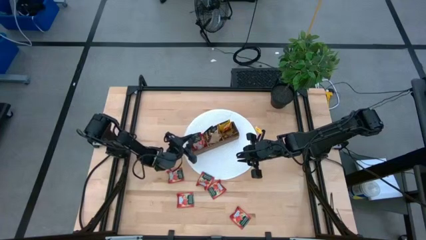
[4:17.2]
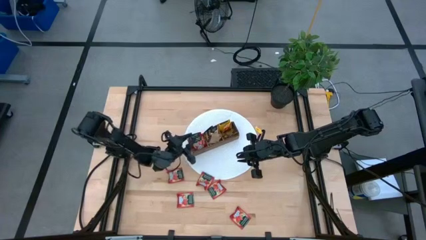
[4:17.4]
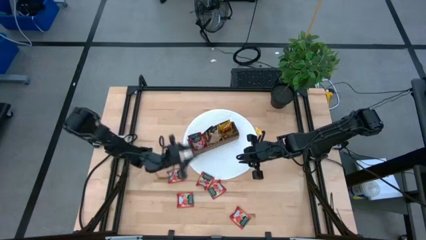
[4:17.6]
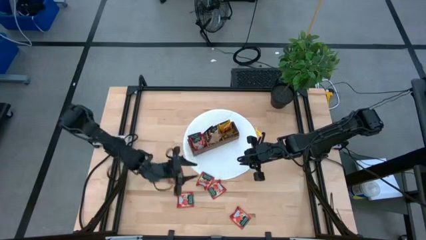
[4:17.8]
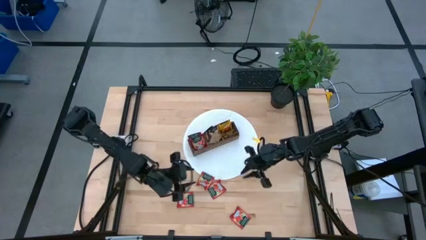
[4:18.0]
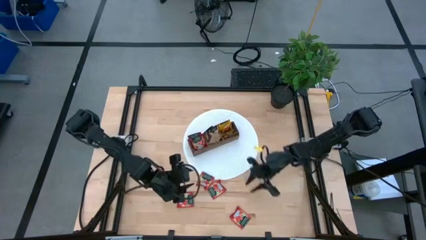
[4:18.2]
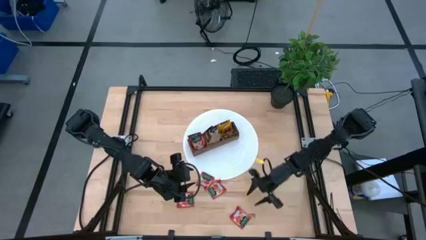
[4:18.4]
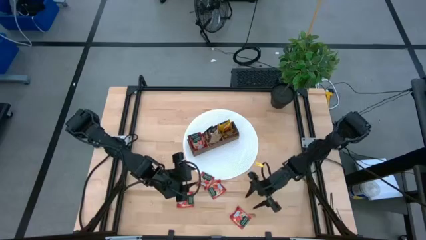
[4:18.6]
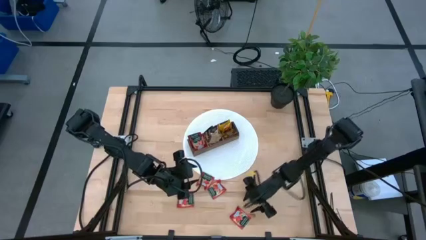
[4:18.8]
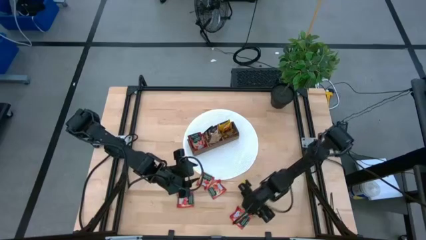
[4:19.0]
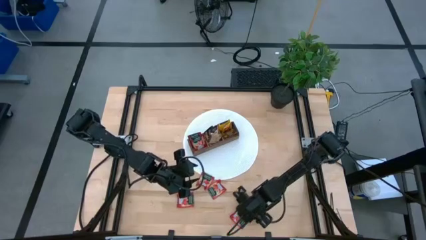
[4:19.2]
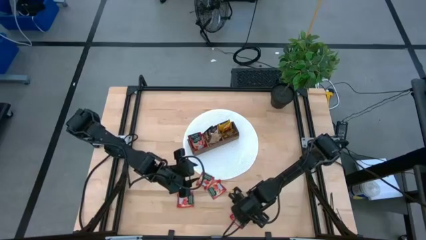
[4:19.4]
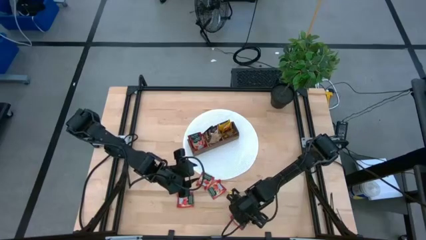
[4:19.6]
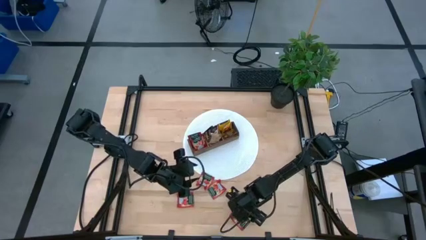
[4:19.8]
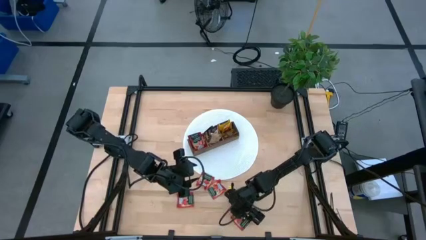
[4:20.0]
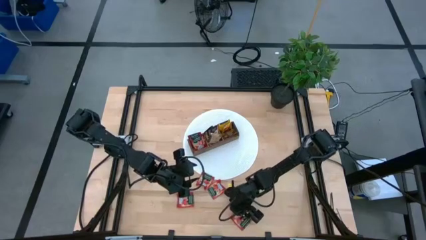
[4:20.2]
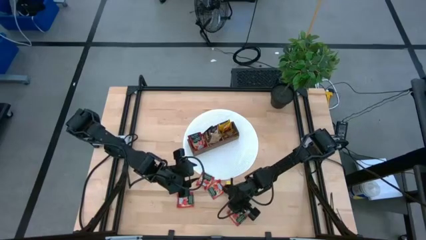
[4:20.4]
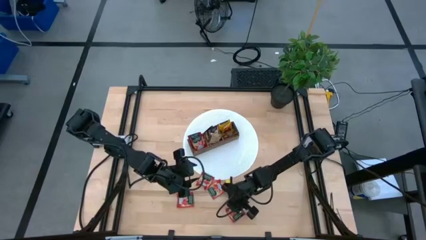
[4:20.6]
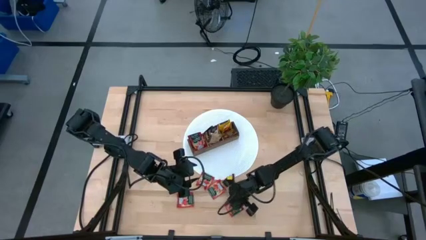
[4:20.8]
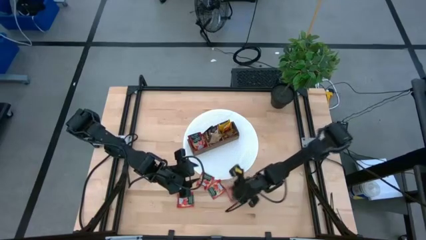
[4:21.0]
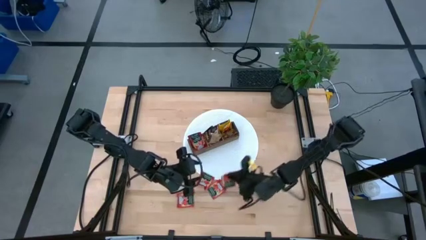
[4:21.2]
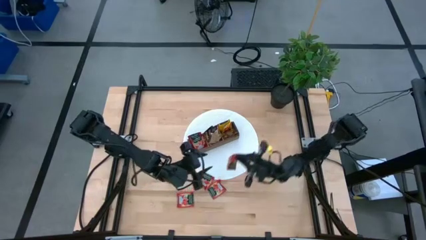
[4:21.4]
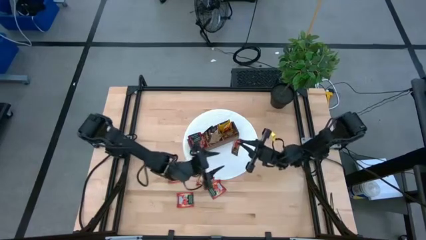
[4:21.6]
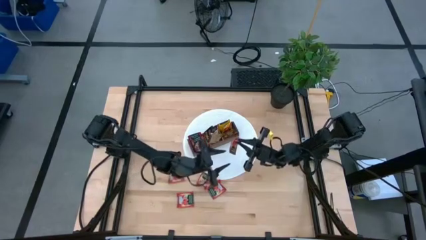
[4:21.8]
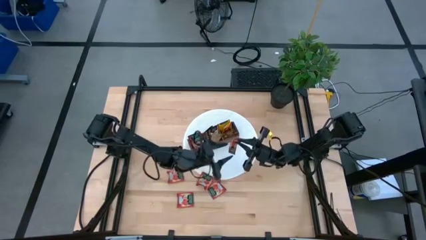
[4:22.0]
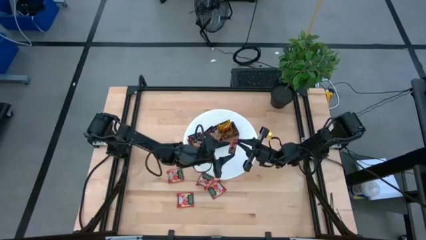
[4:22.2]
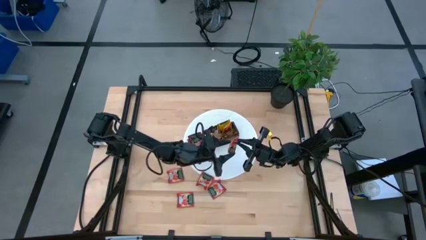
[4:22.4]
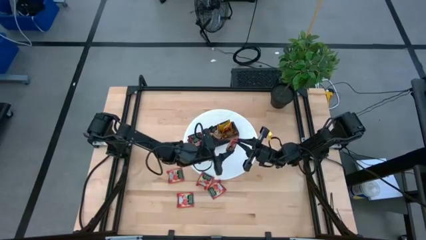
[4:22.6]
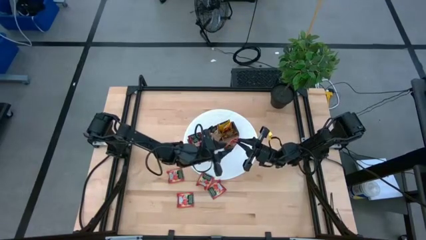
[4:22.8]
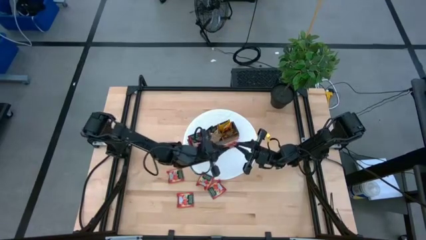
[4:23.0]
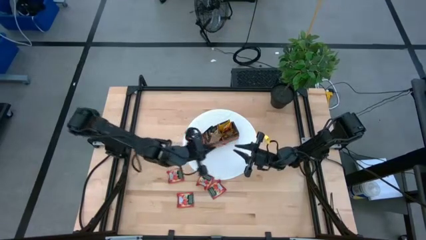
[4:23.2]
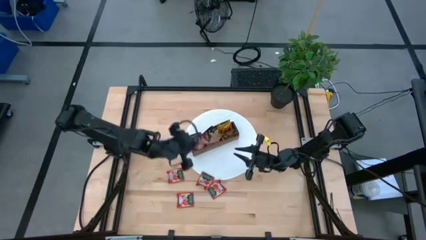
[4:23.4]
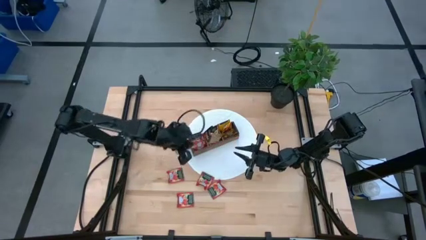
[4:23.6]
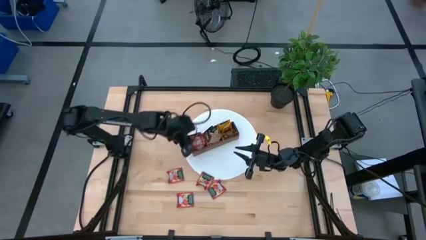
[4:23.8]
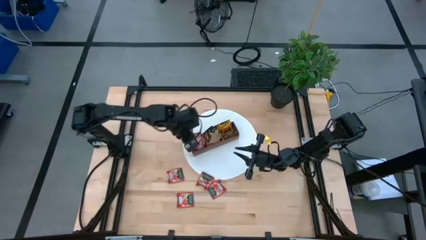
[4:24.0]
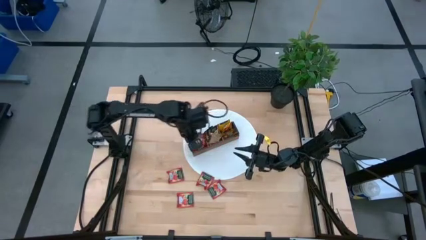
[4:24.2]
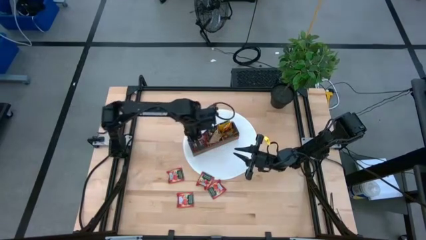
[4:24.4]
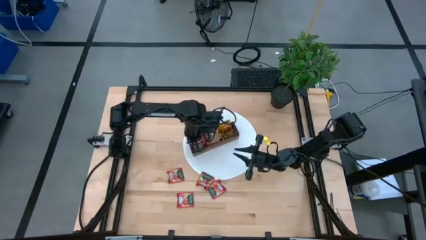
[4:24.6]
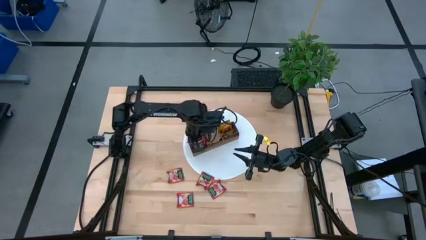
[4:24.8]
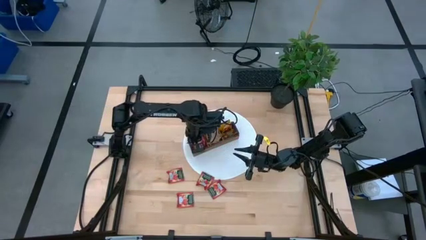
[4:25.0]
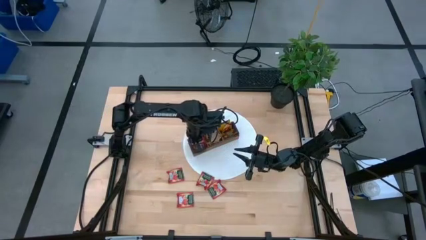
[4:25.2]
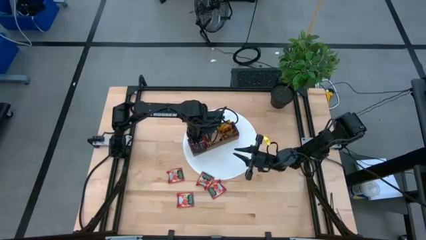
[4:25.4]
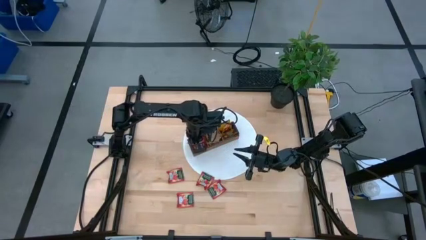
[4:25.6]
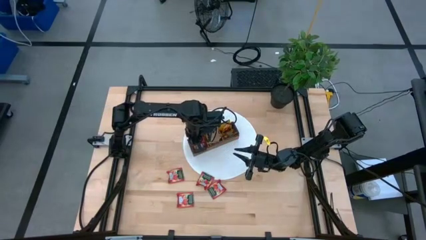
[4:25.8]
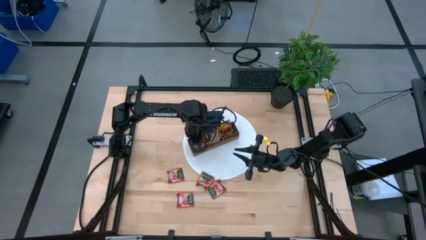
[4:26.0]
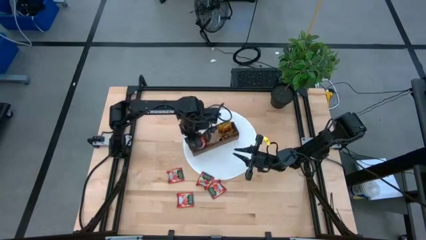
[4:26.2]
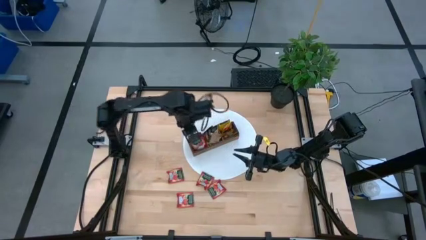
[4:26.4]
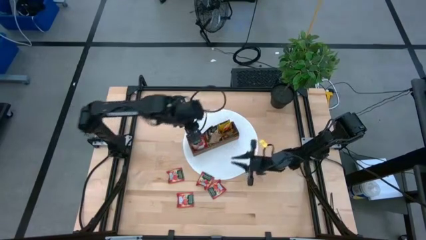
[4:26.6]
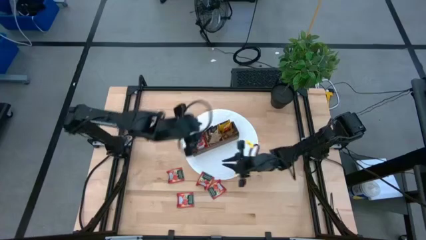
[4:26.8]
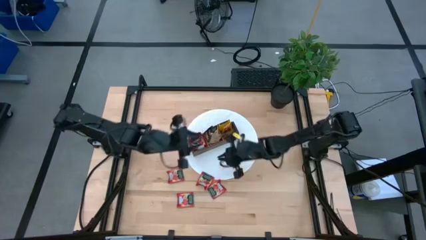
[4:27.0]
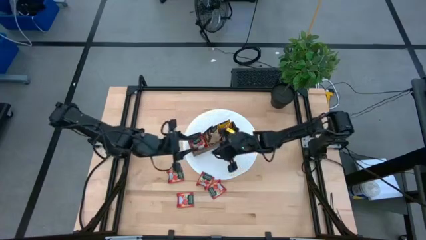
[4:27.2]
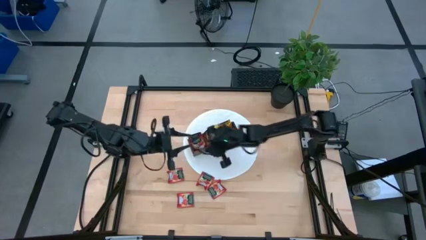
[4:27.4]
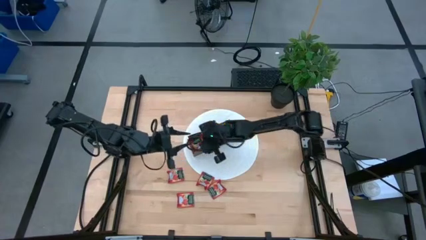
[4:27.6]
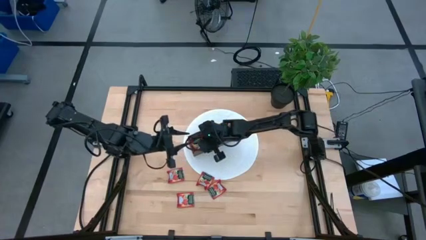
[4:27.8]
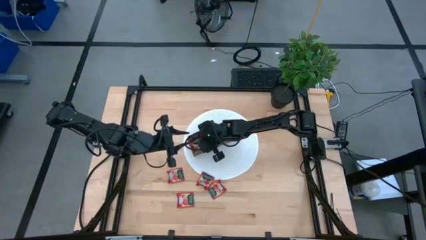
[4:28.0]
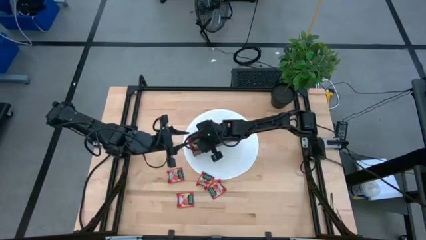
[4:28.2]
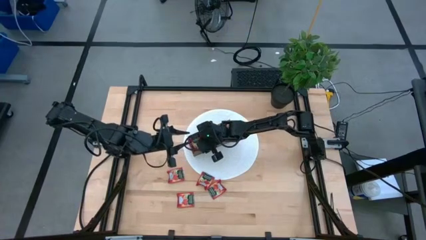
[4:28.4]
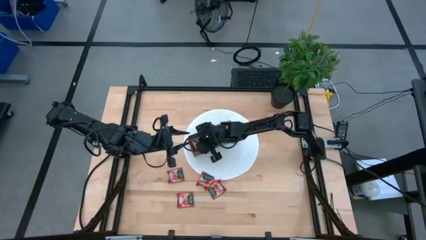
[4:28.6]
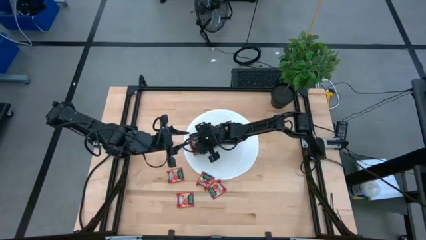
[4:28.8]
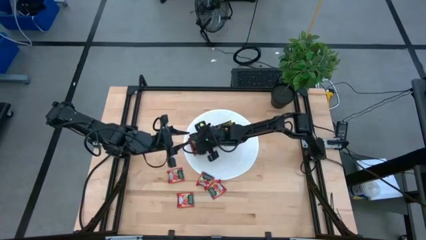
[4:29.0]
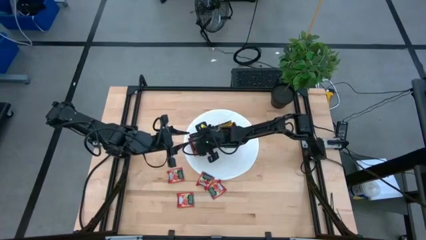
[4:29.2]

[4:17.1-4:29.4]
Task: Pick & Place Tea
Put the red tea bag into the left section of the wooden organizer

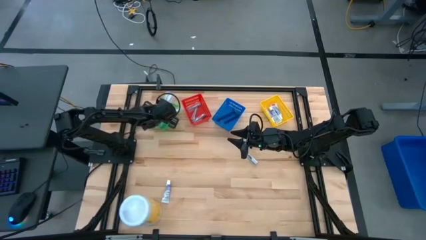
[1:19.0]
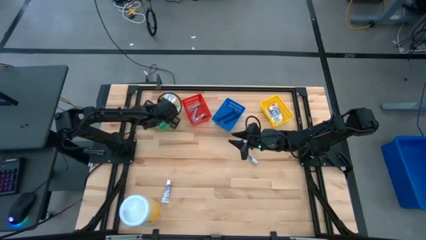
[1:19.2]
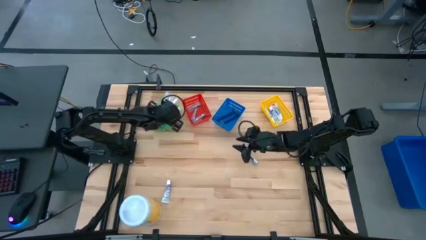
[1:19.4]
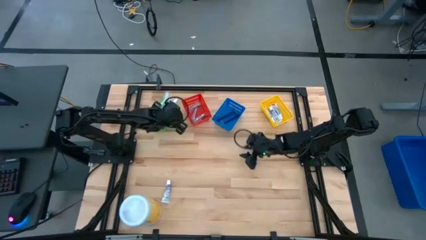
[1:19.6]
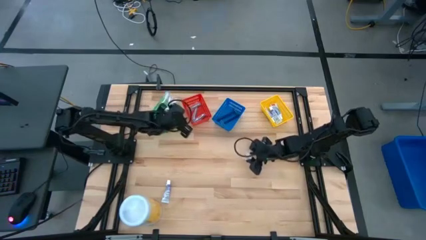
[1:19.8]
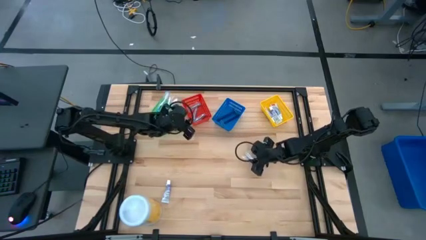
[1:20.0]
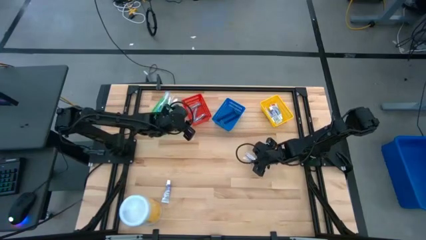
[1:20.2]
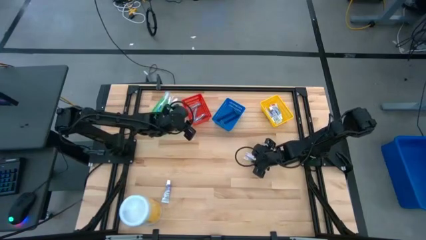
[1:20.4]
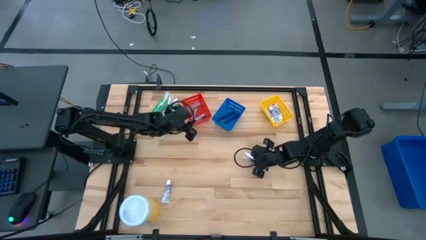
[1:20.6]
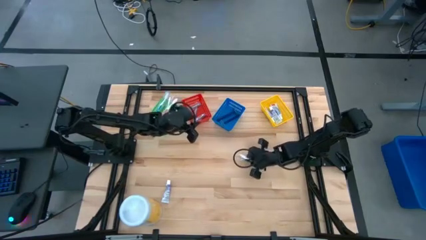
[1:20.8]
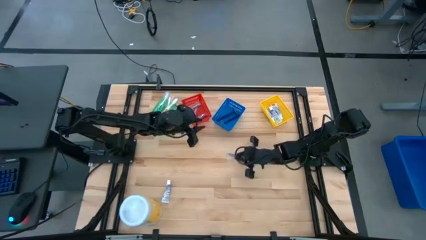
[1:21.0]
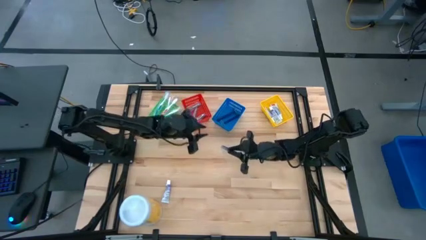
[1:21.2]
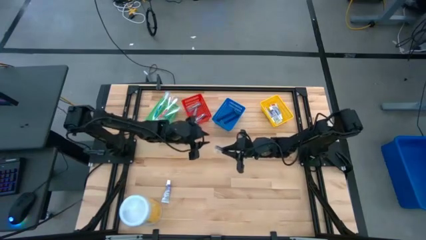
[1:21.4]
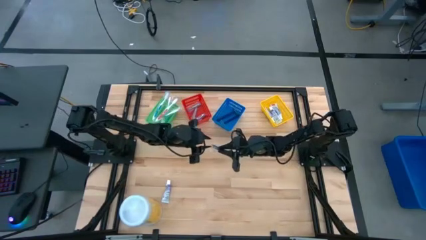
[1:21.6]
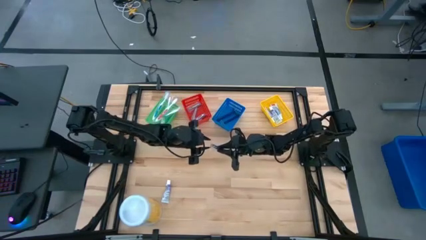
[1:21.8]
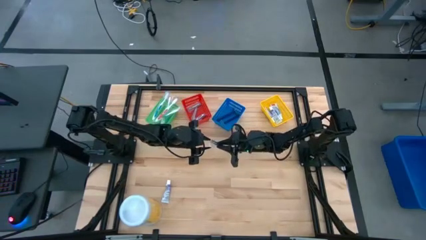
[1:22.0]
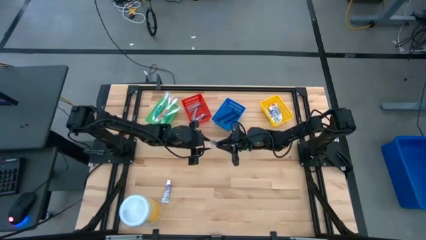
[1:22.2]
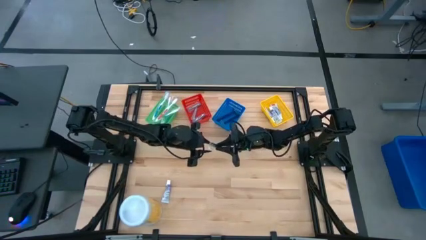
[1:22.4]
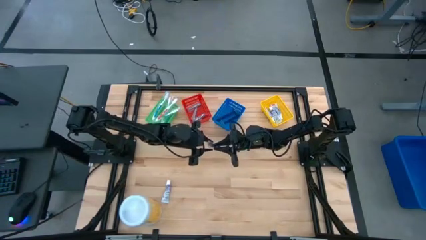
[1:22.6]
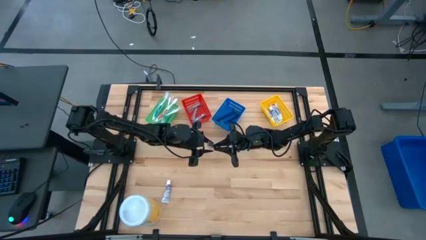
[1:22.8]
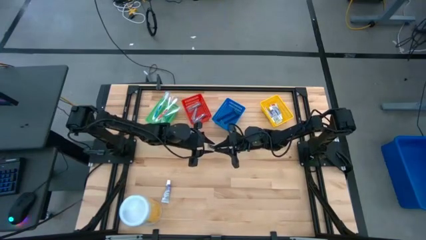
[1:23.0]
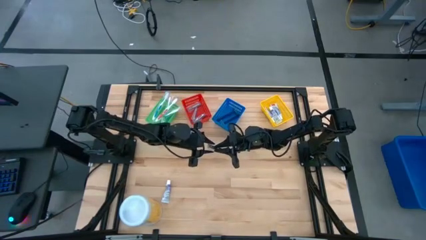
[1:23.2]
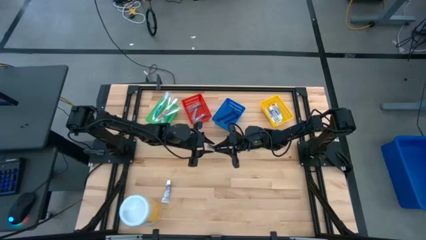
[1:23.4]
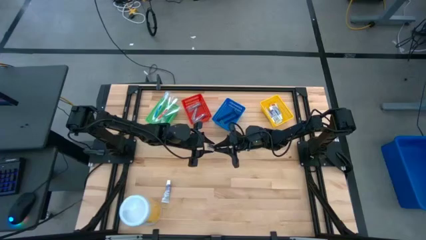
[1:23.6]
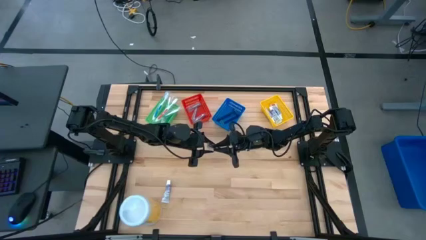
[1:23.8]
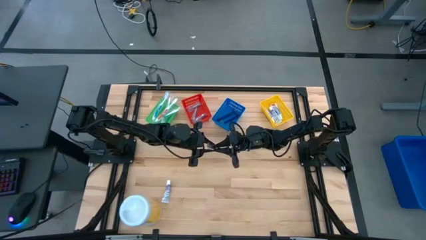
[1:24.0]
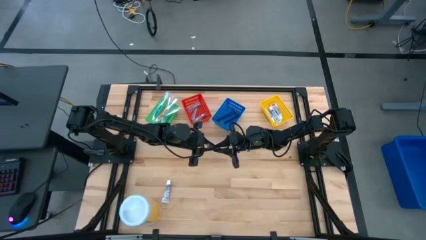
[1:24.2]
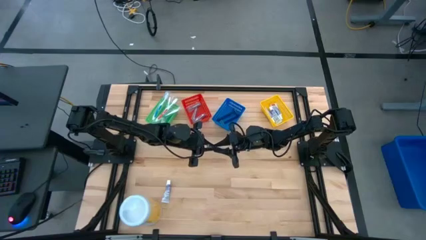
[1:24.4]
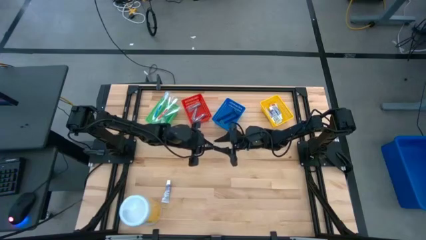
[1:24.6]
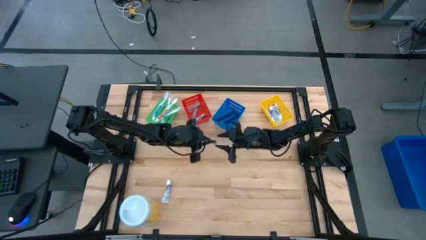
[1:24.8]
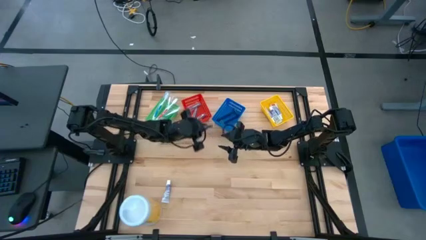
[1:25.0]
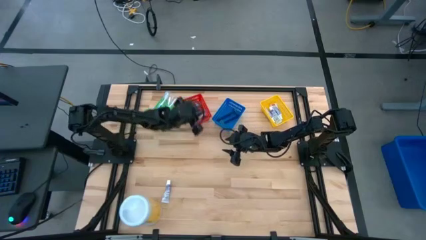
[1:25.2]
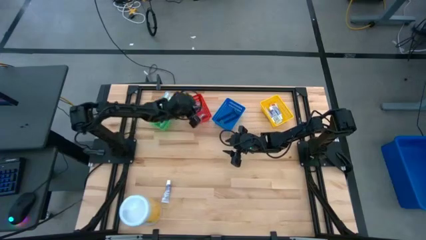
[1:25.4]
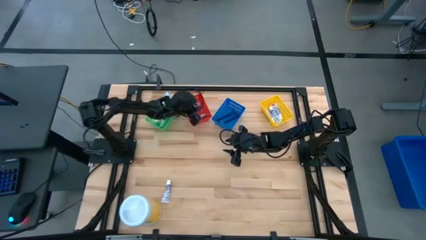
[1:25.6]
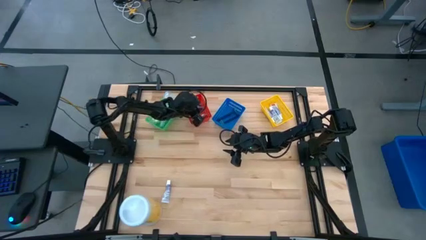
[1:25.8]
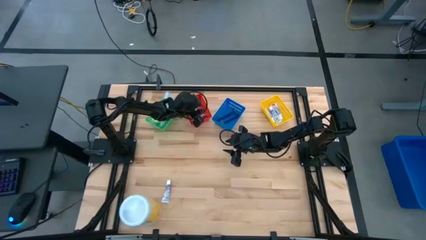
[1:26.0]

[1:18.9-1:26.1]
Task: Pick & Place Travel size toiletries
Put the nail cutter into the red basket
